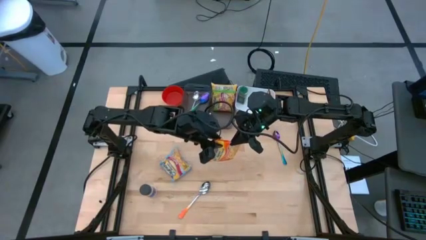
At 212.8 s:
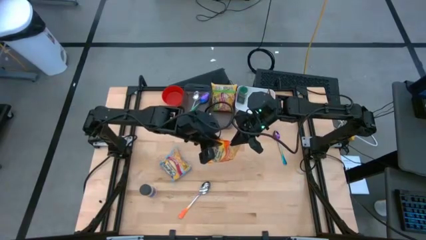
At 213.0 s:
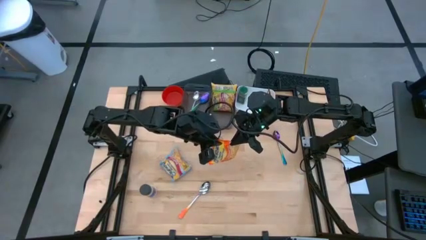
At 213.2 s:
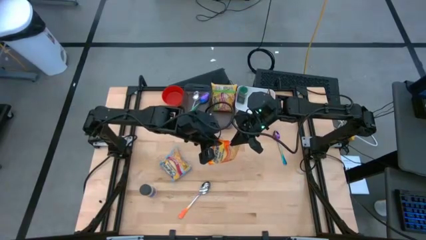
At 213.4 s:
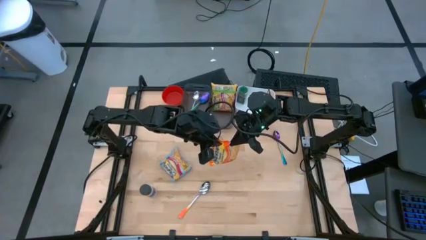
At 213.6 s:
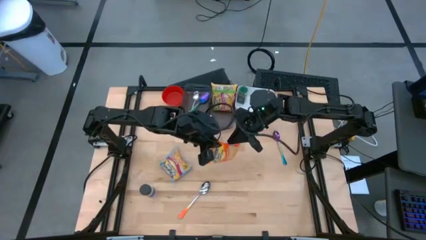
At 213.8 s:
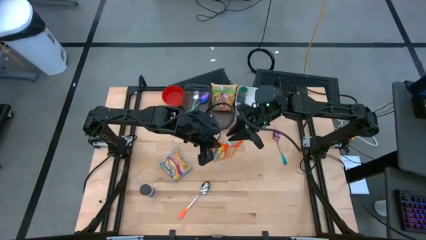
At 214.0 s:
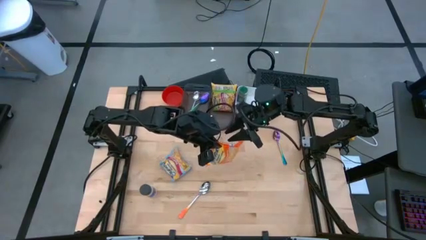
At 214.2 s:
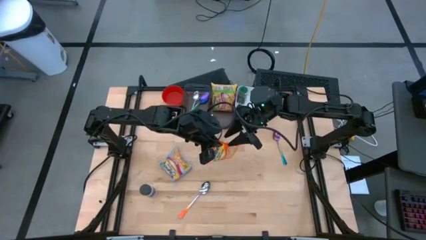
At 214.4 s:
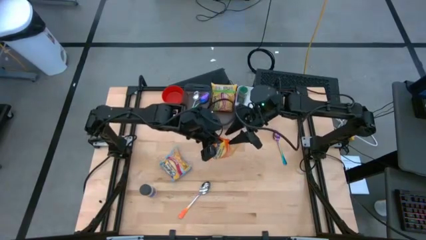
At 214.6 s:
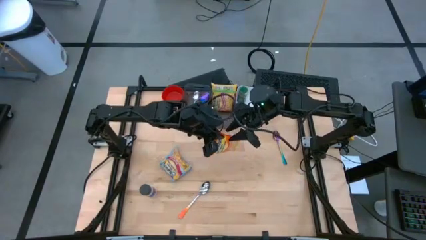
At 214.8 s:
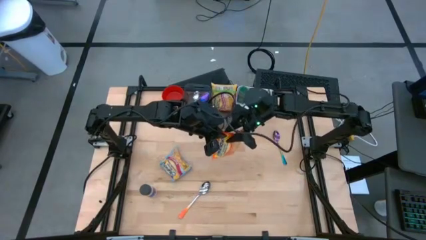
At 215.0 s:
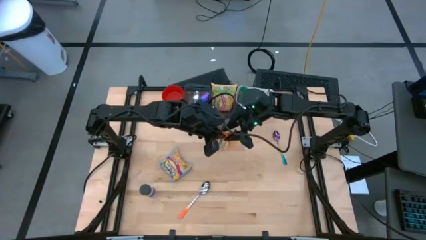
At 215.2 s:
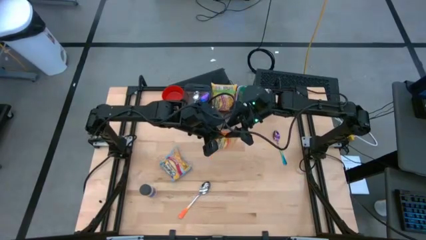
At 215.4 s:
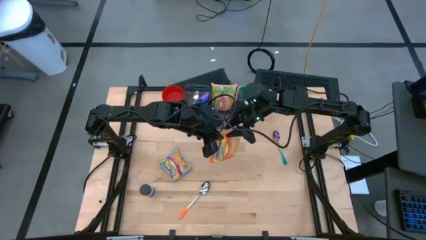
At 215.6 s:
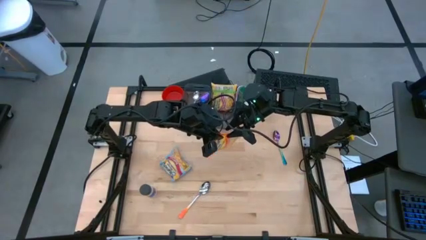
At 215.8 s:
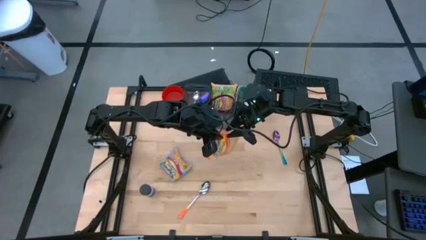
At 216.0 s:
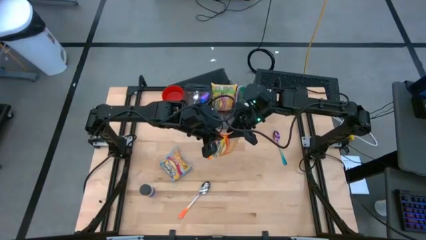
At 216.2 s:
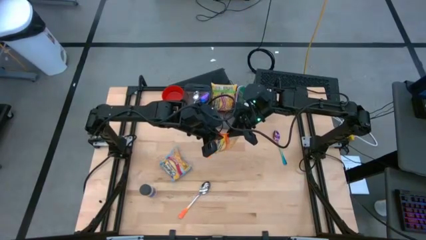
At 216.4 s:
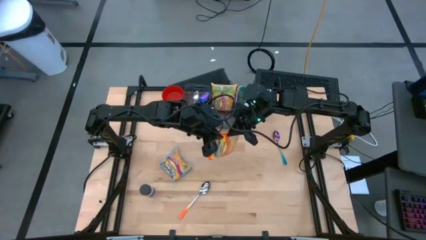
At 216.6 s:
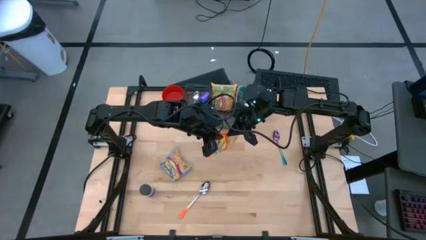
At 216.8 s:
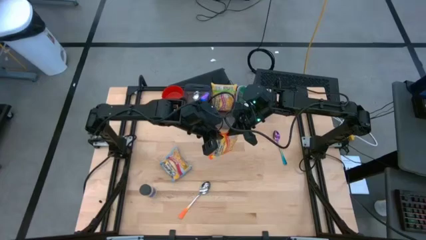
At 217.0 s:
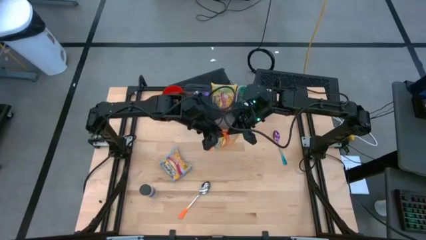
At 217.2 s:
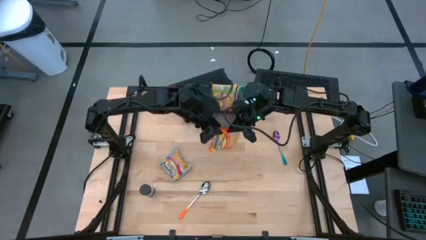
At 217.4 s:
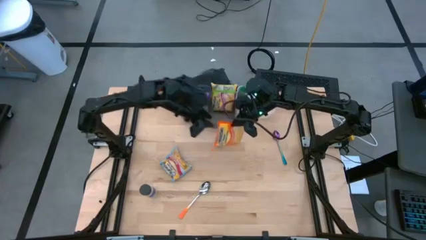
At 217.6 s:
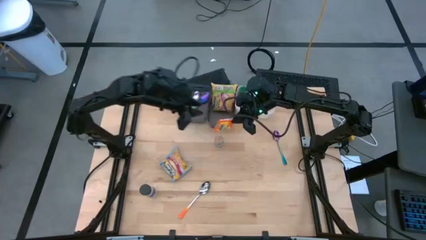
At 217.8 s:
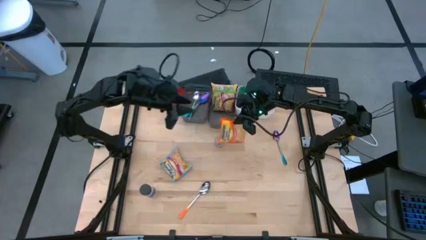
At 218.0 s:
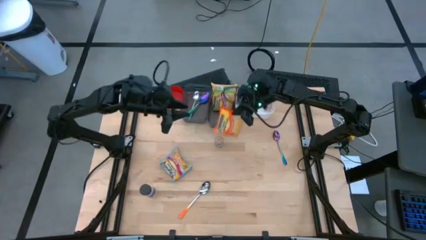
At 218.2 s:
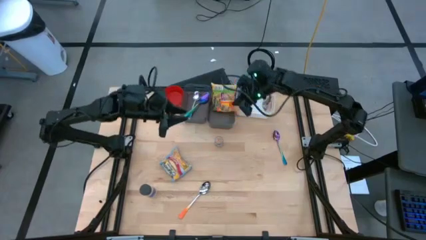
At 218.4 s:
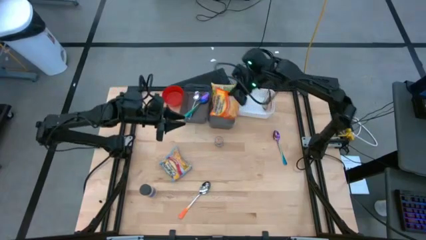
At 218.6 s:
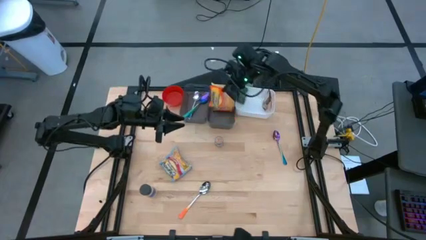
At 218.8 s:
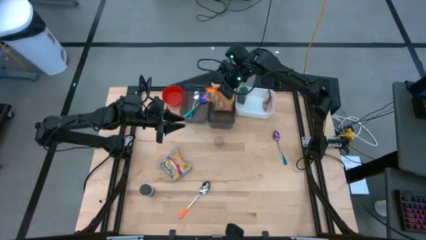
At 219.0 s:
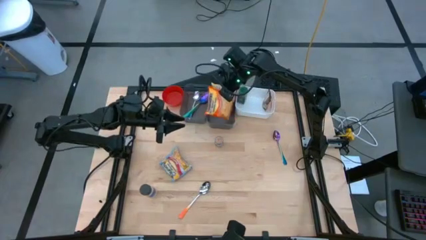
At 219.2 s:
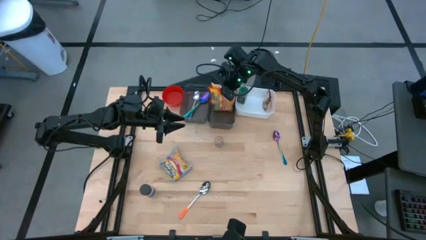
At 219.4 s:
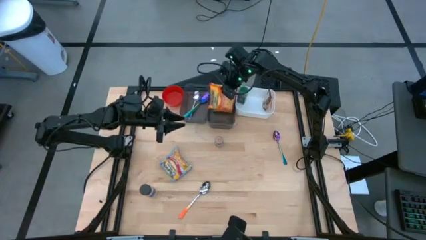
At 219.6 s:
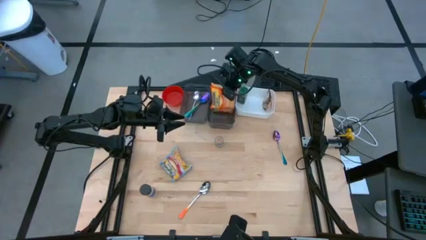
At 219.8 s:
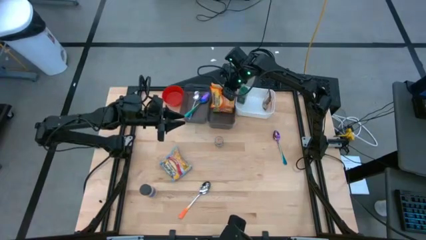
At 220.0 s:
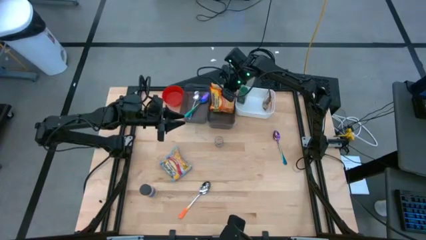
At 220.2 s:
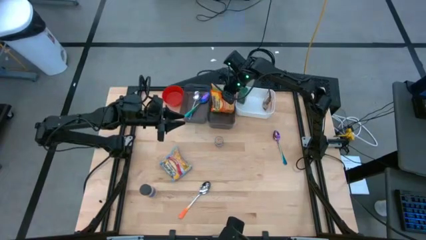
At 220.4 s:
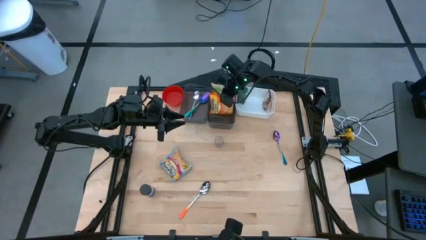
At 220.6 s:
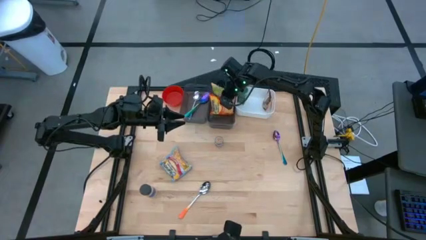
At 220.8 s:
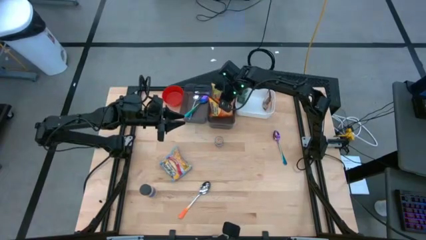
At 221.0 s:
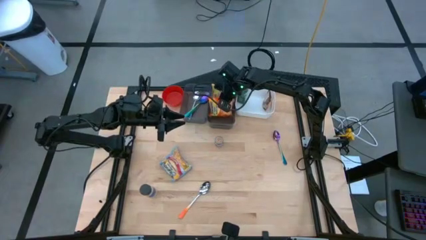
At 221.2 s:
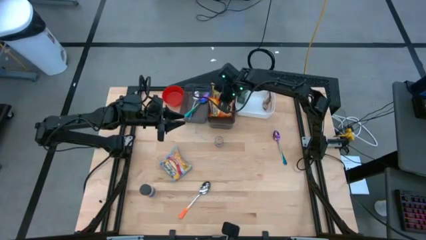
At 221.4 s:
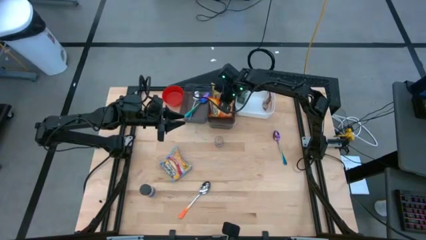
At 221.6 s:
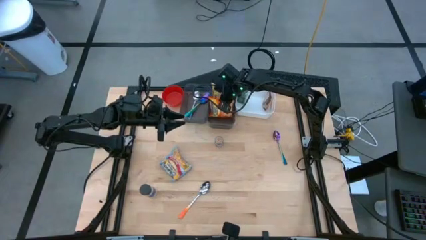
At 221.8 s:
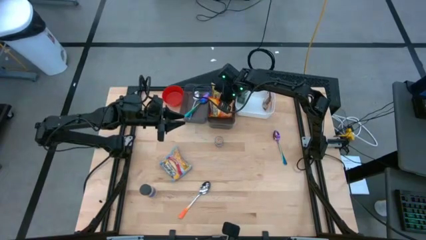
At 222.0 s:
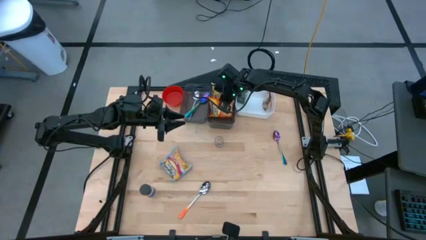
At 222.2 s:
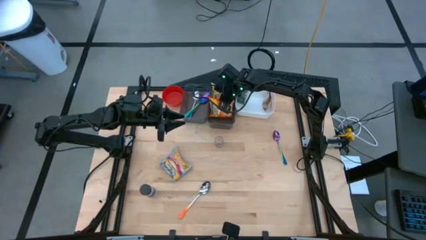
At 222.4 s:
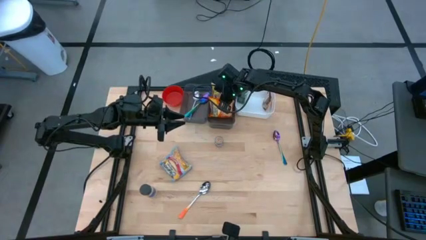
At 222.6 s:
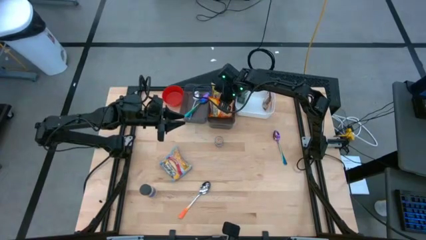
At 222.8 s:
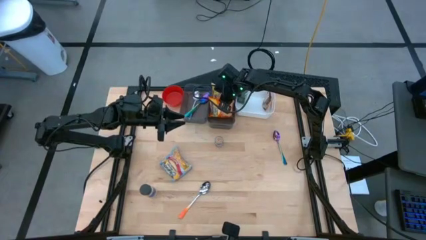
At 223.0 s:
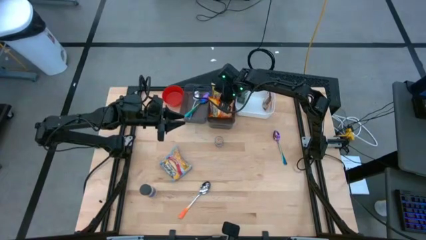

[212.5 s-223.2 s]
Task: Pick & Place Food Item
Put the orange noodle pack into the right black bin

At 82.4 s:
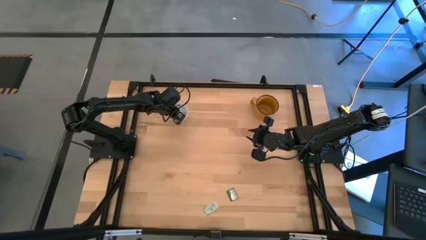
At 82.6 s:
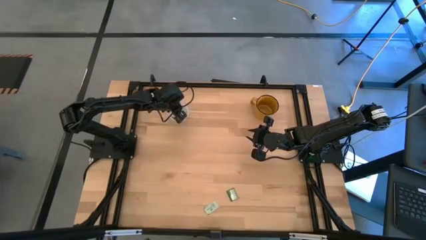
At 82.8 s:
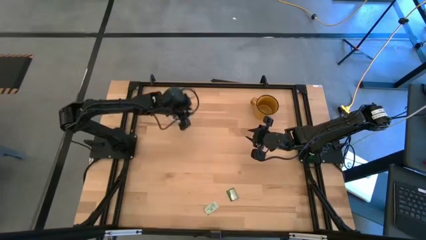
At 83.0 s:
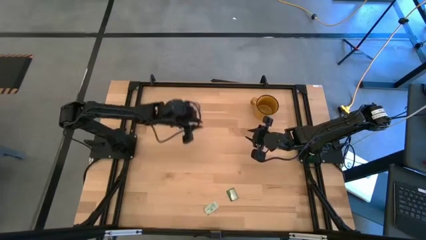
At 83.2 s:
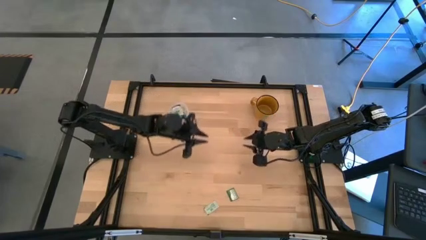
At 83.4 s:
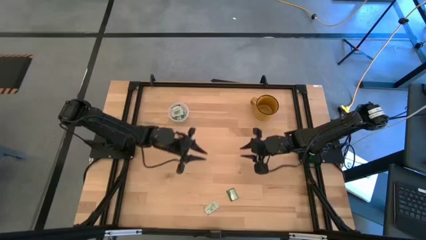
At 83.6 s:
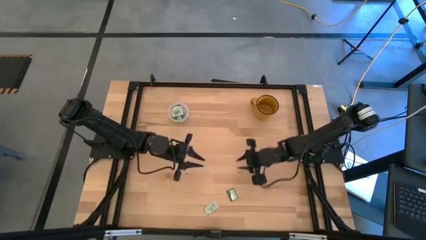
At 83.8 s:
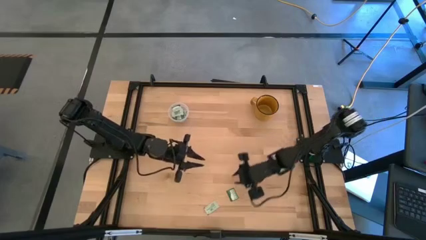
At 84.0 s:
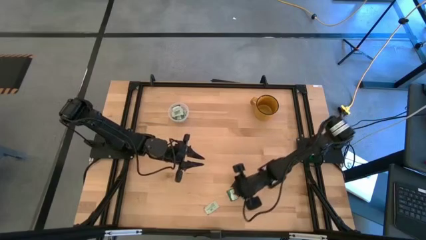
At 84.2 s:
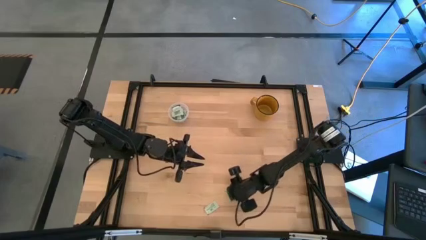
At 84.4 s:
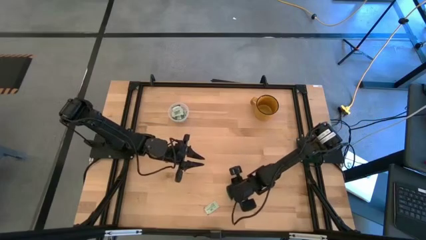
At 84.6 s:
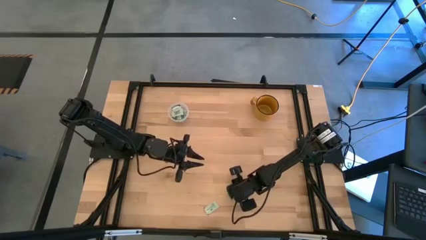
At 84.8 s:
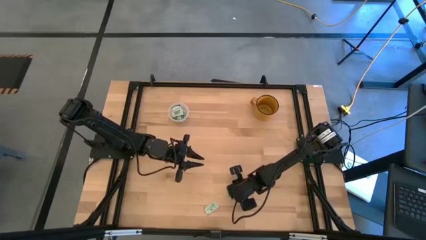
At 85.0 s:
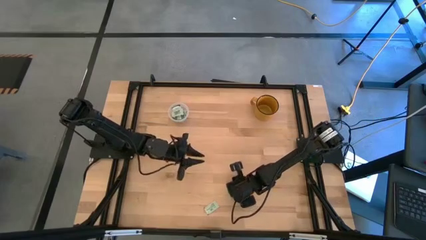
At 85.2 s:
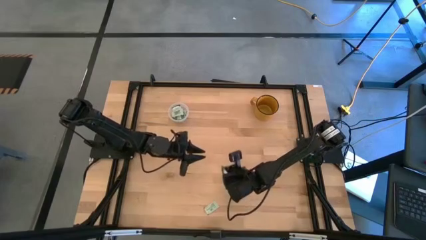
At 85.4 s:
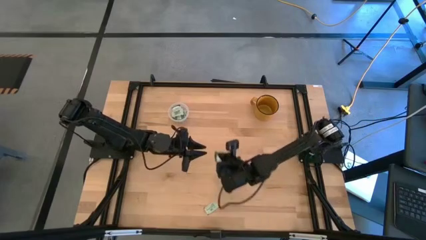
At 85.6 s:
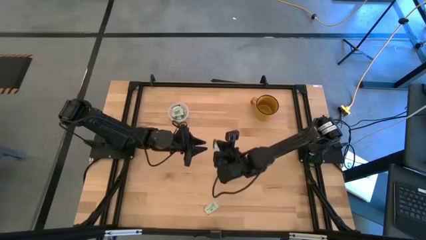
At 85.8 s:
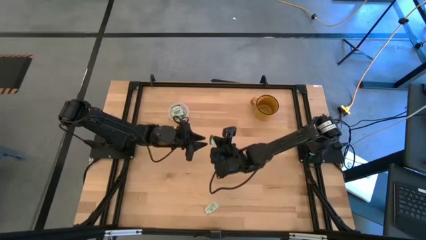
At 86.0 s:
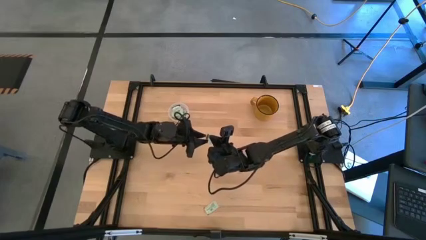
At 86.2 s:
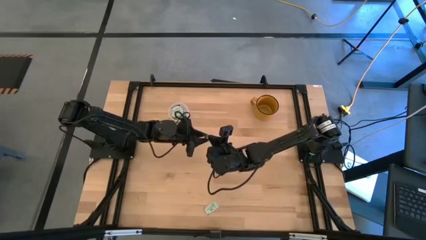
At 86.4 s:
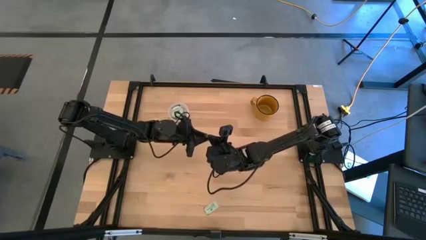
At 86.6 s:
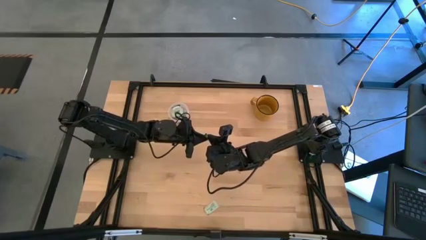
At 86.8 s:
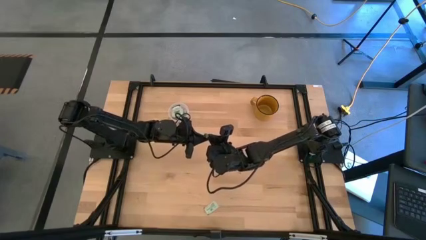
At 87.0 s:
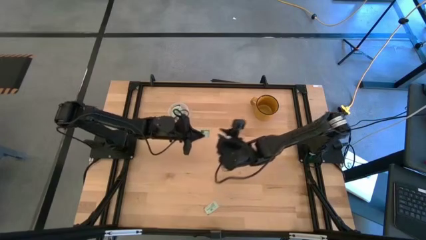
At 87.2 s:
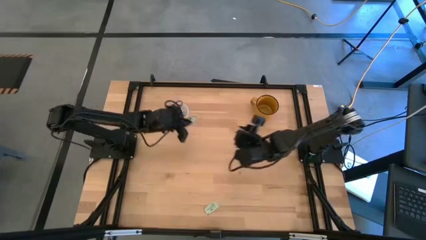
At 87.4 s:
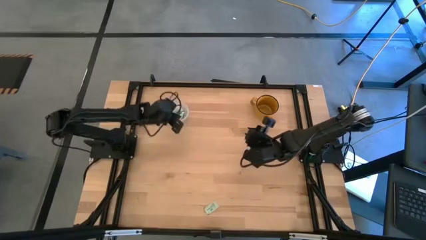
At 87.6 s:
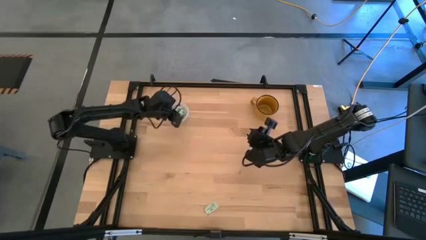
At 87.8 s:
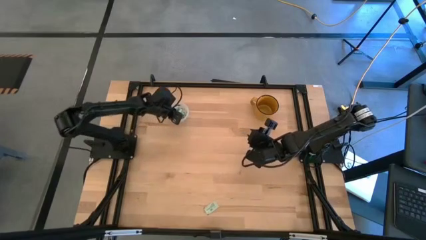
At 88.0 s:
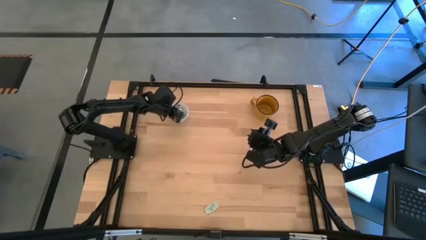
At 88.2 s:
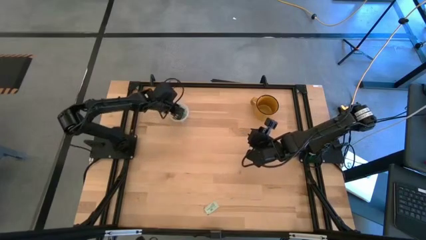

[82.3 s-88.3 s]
Task: Pick and place Stevia / Truvia into bins
Put the truvia packet into the transparent container
